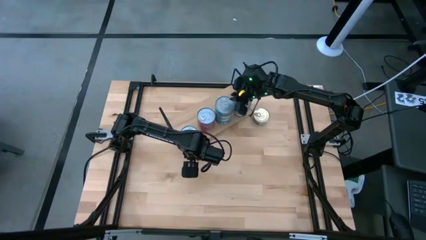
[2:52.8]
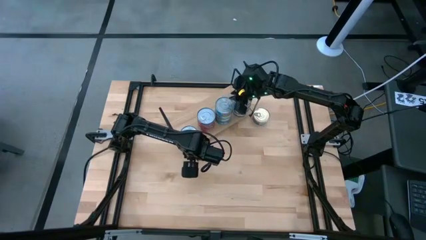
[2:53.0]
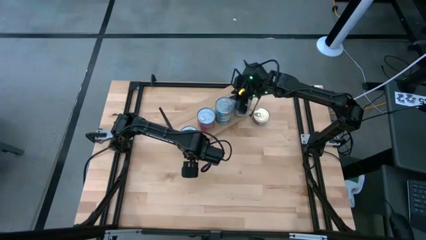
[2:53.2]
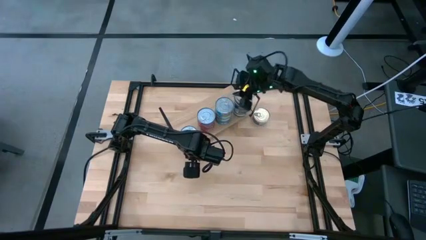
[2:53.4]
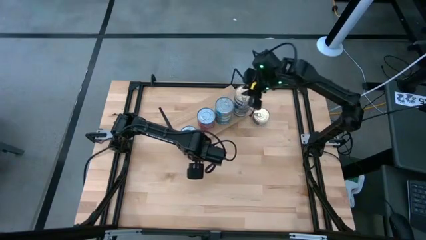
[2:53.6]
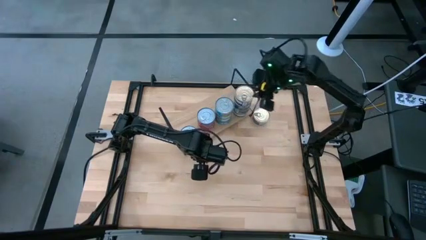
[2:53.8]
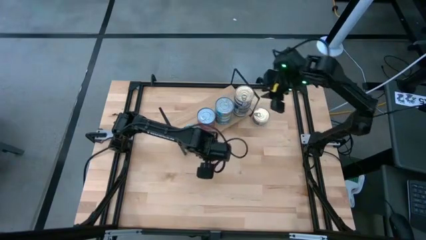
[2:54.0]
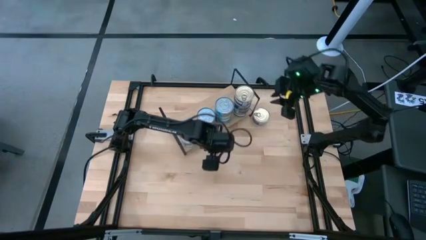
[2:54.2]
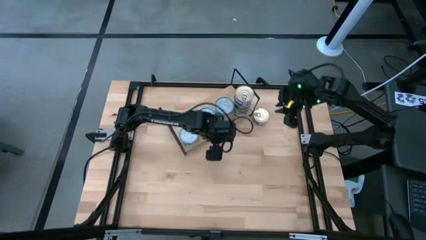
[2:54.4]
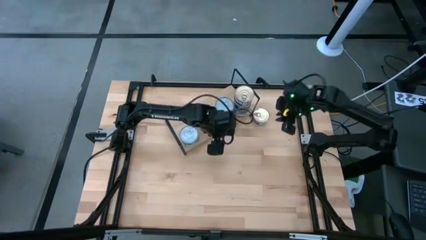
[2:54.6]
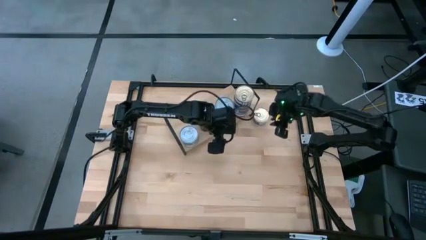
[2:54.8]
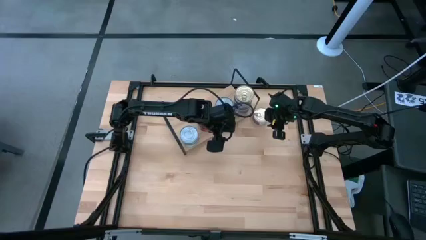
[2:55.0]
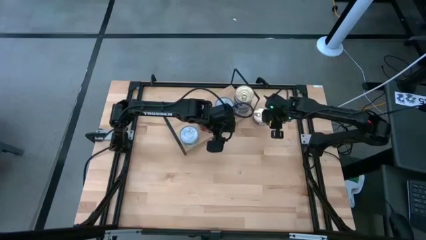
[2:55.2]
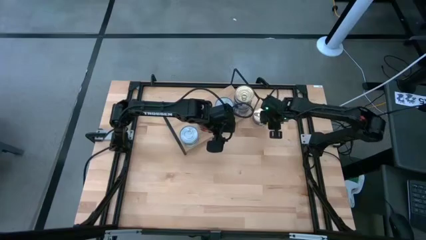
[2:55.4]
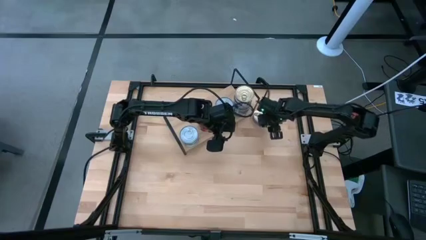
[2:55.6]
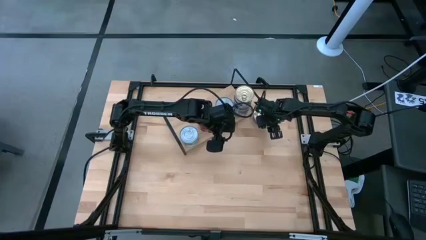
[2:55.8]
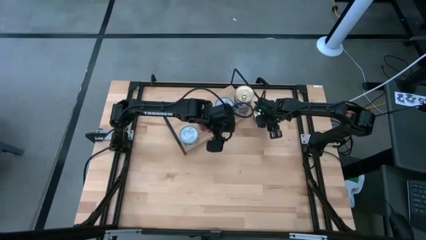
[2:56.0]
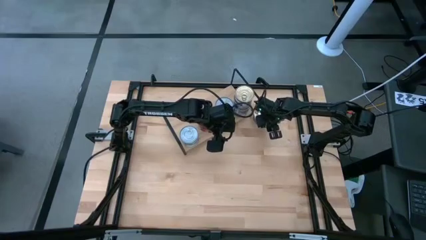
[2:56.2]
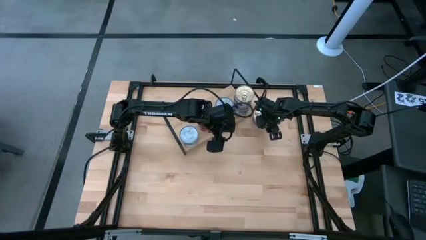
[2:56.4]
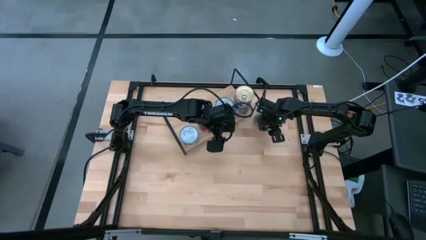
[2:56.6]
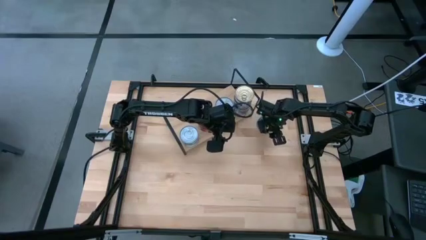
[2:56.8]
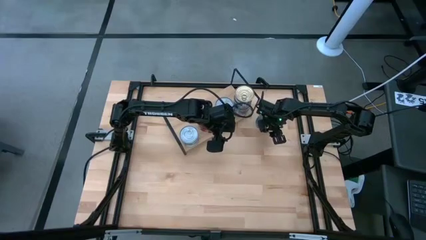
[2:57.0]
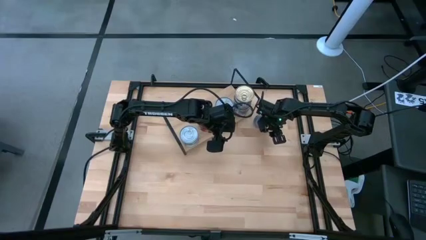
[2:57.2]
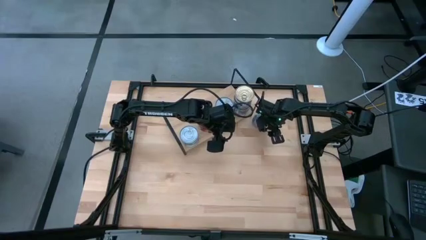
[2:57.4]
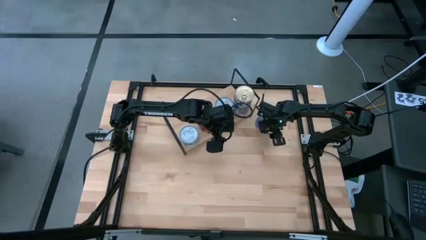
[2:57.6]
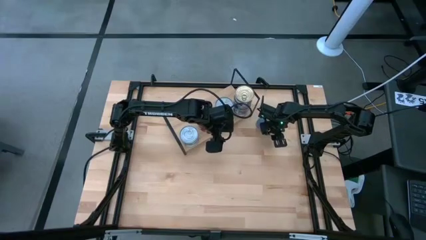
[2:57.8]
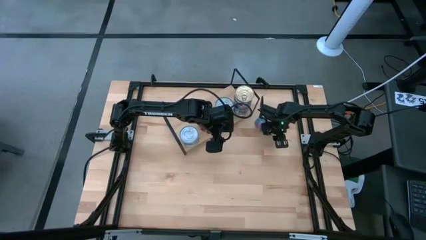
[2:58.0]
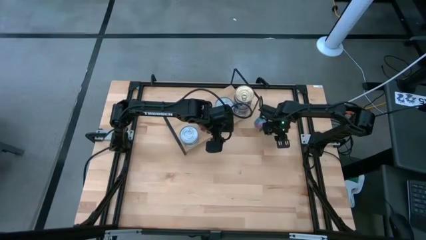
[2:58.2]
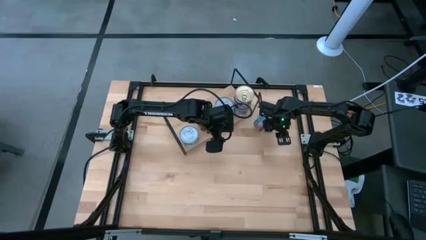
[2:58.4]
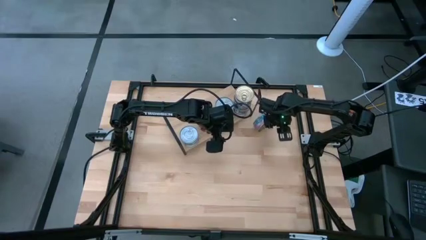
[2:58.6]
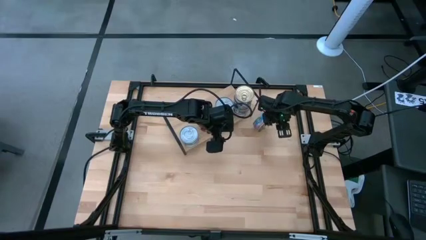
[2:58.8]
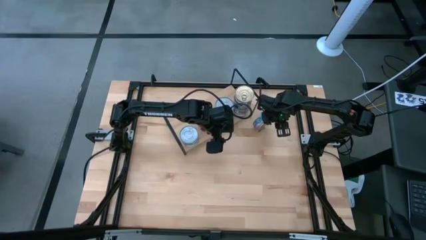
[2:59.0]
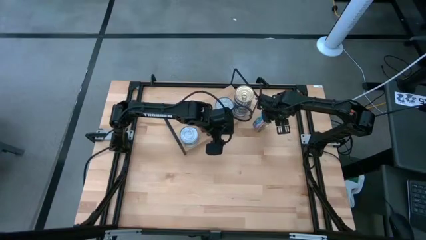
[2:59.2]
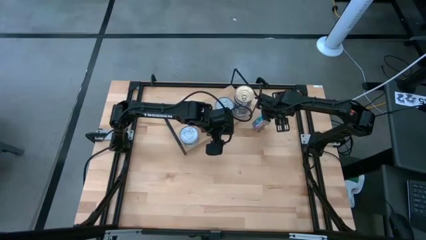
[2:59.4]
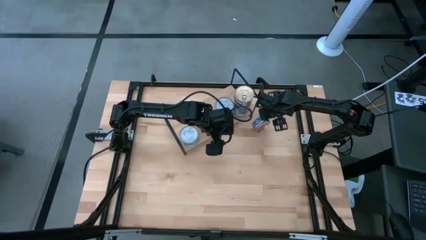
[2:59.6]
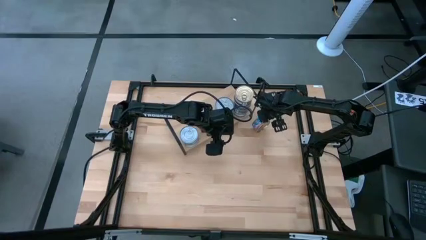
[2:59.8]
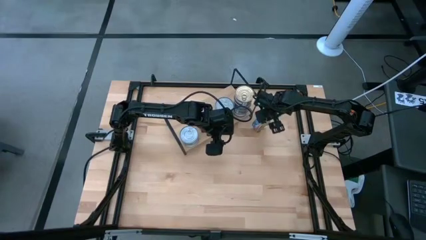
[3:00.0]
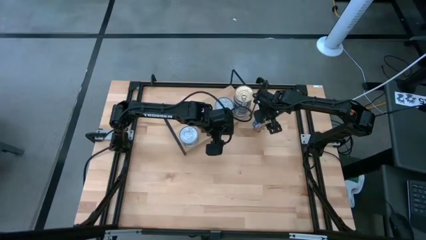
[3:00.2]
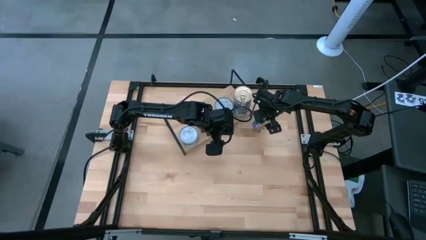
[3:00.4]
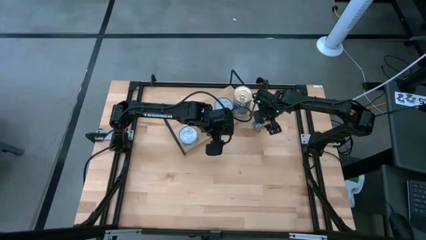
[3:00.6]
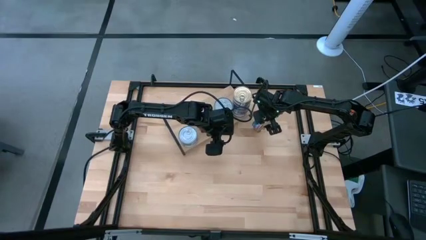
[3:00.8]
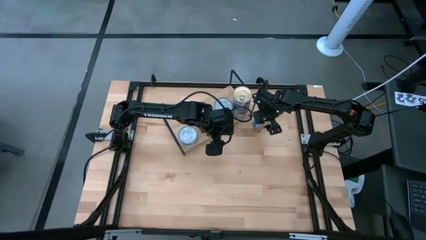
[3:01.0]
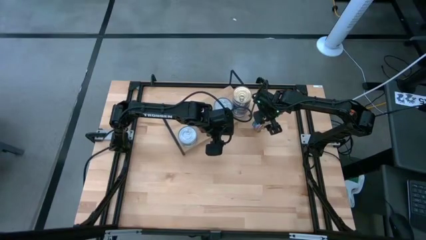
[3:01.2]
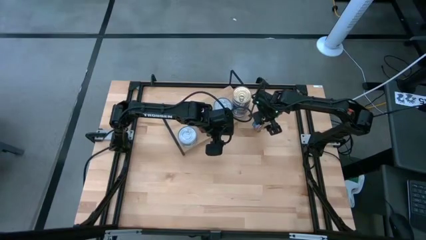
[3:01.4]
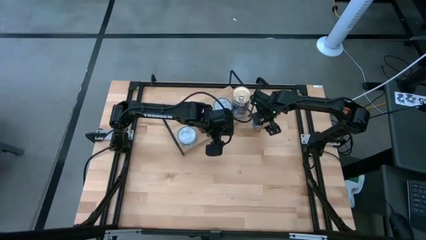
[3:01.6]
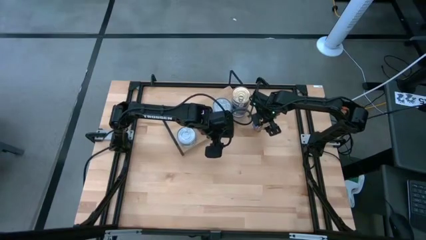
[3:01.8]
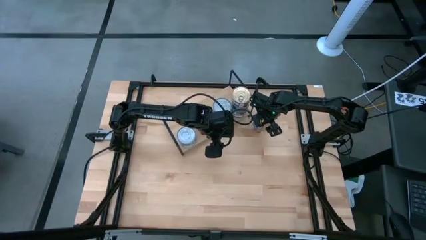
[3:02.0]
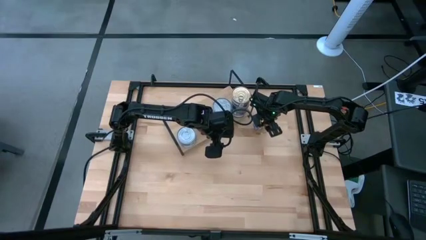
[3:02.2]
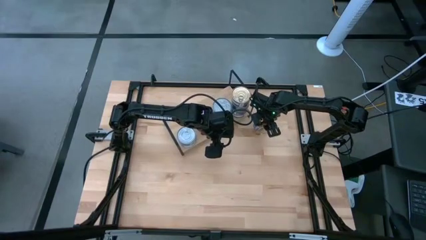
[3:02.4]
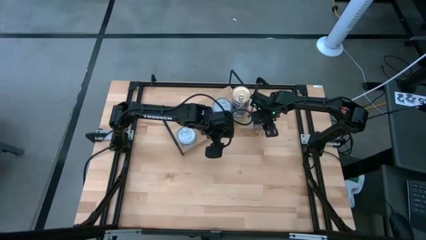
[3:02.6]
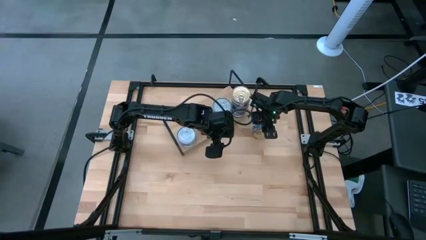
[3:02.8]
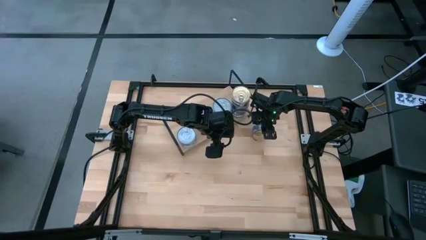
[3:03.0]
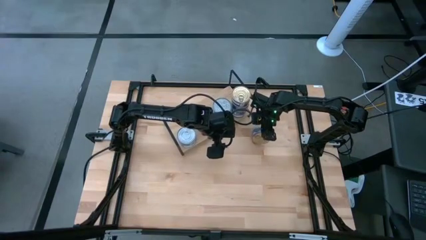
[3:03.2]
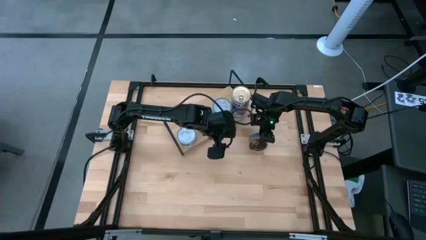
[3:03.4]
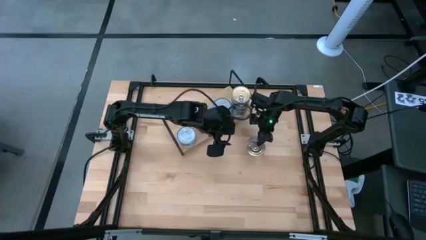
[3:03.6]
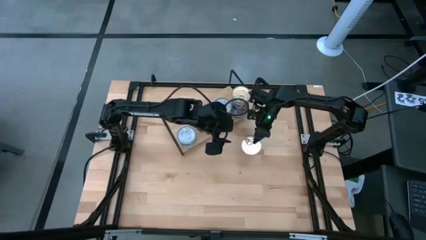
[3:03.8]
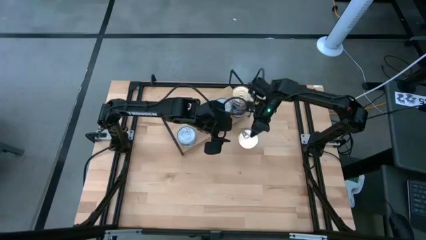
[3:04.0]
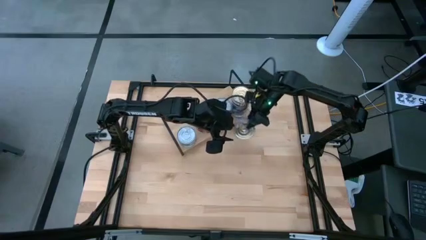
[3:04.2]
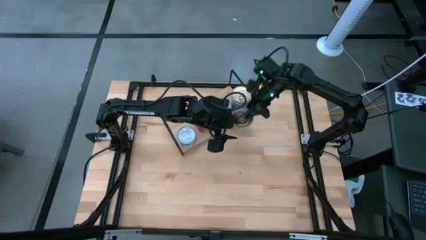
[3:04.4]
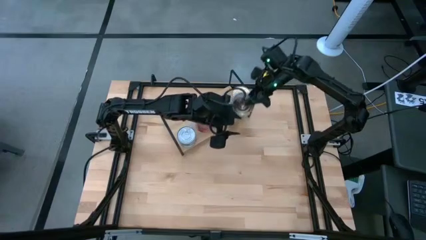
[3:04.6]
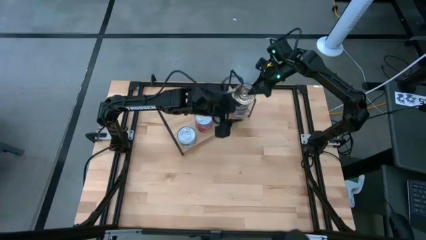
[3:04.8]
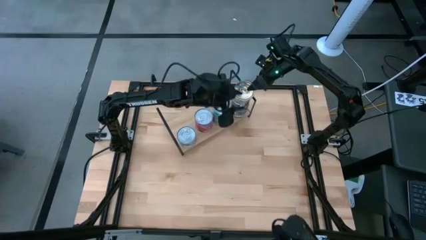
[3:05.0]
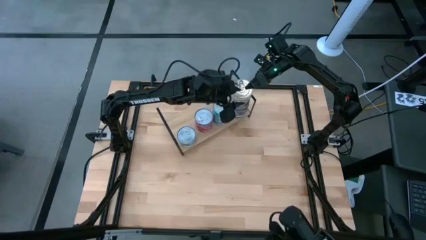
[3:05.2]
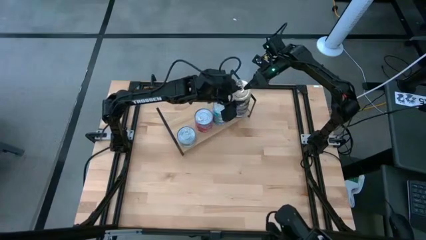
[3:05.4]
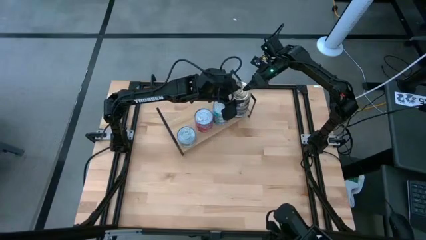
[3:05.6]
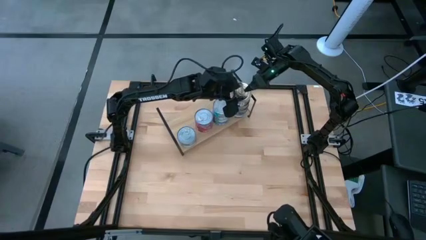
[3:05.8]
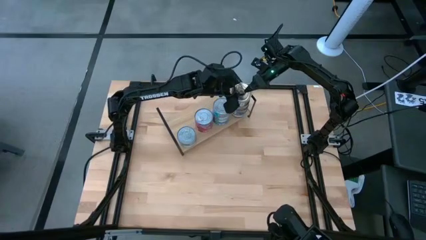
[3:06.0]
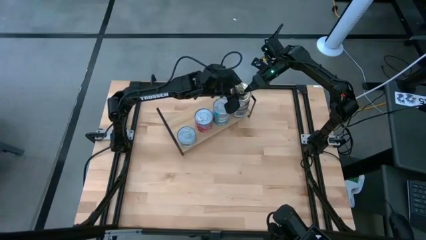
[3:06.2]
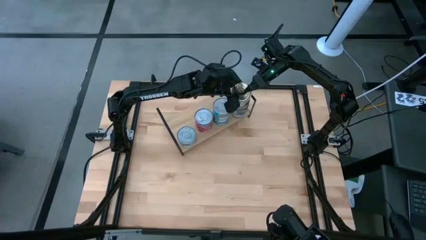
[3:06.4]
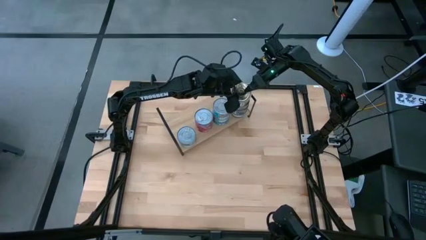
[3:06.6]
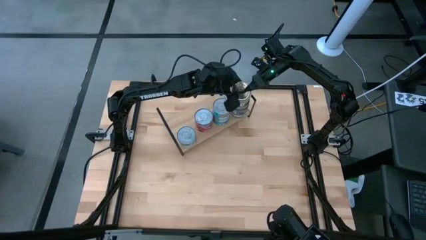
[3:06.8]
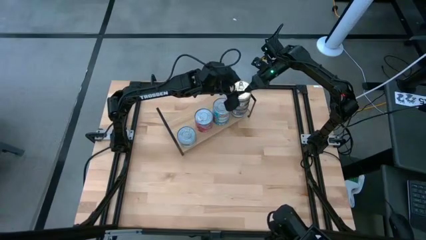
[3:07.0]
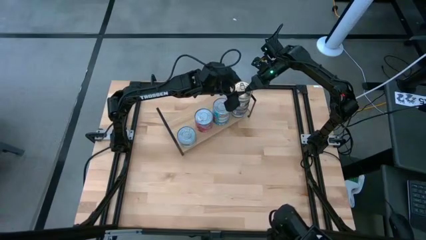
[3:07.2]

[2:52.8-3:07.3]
Task: Stack canned seafood by type on shelf
Stack the blue pink tuna can on top of the blue pink tuna cans on the shelf

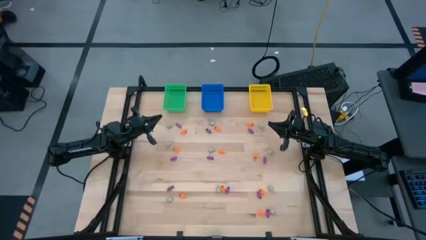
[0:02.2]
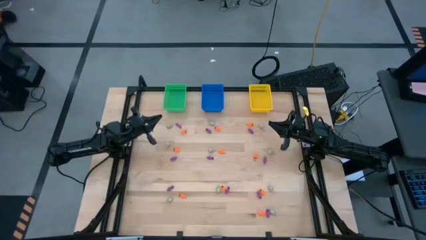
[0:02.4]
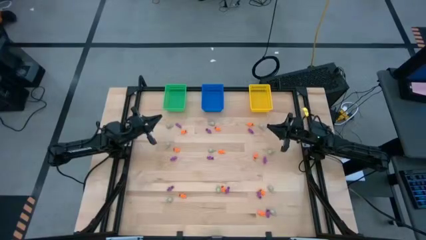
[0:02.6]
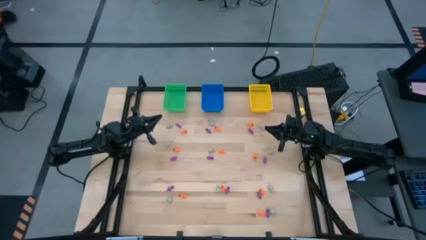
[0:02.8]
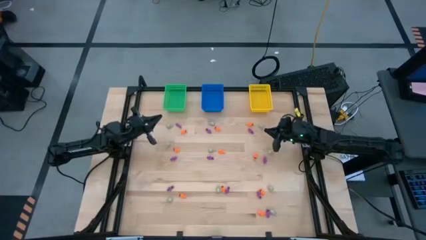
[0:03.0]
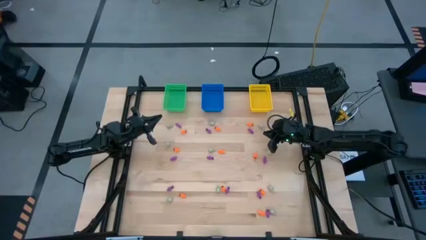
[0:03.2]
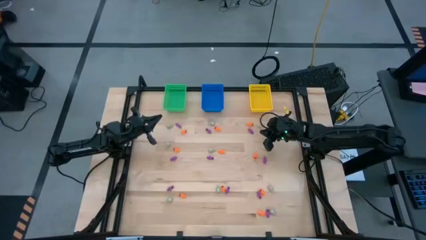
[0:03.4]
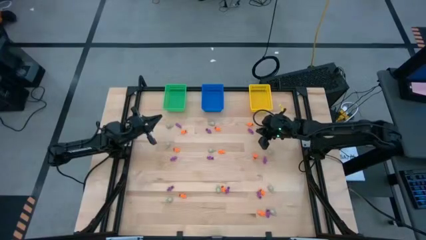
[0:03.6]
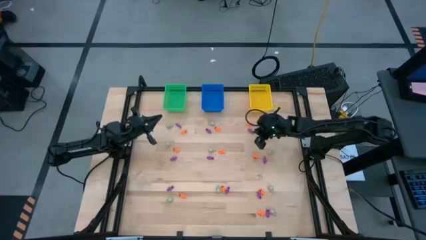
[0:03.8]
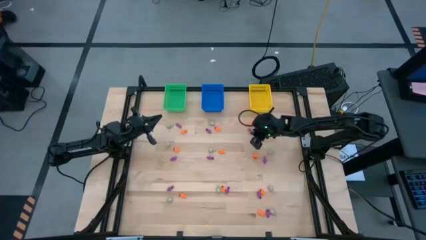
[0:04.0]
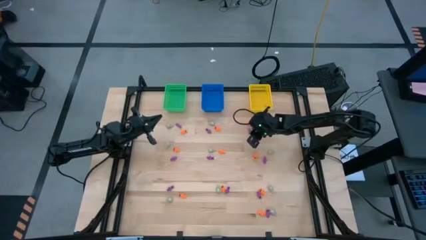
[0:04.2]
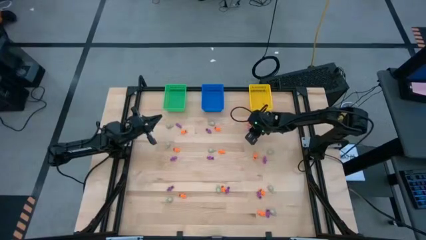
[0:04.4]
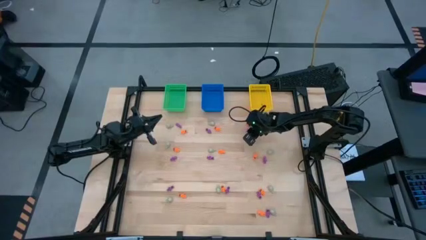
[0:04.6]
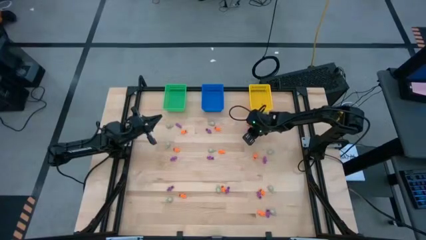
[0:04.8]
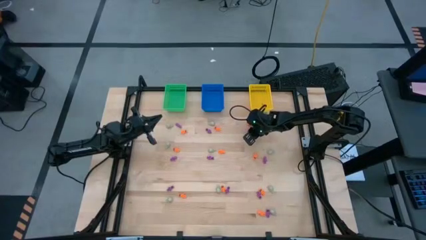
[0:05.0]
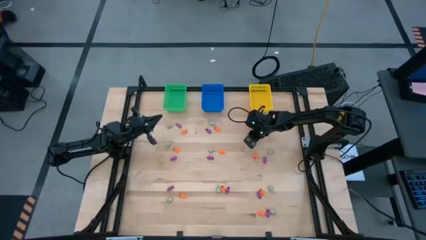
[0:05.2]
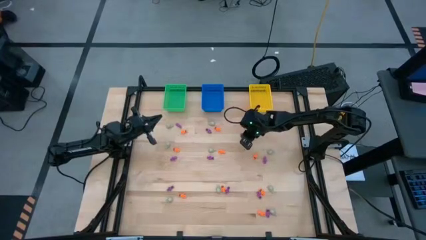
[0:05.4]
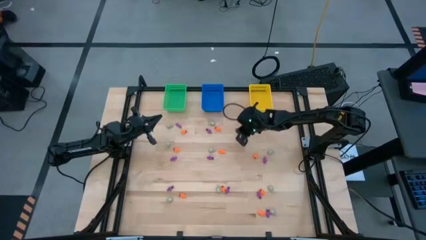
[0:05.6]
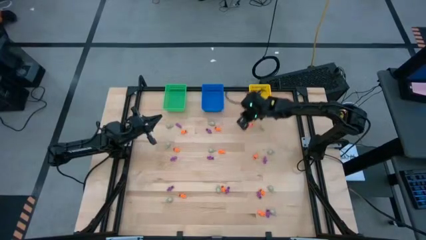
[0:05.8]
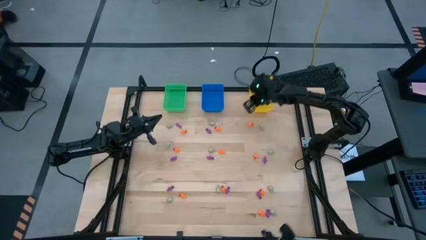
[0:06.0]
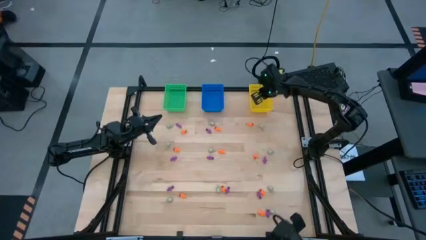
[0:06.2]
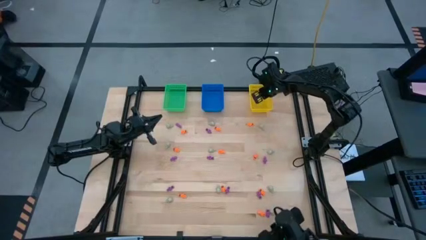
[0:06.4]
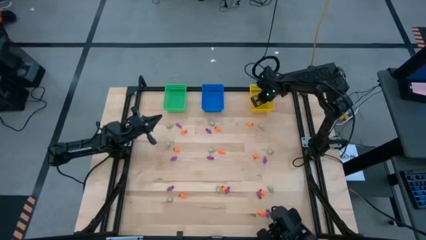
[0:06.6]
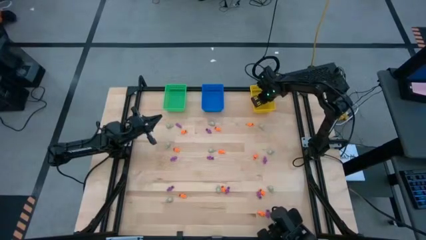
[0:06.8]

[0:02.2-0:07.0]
Task: Sort Halloween decoration
Put the purple skeleton toy into the yellow bin
